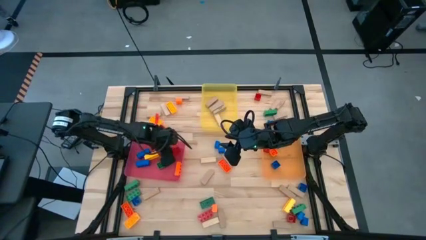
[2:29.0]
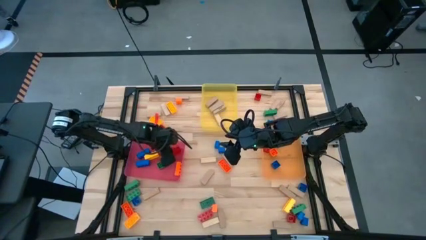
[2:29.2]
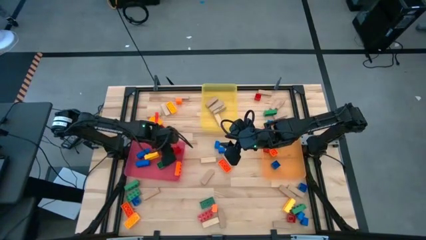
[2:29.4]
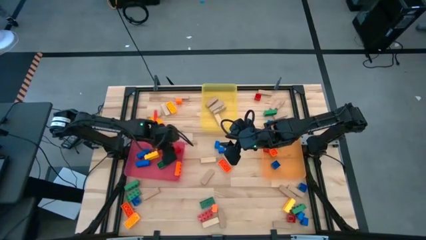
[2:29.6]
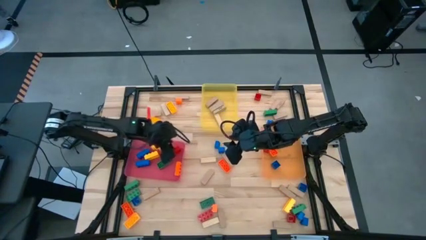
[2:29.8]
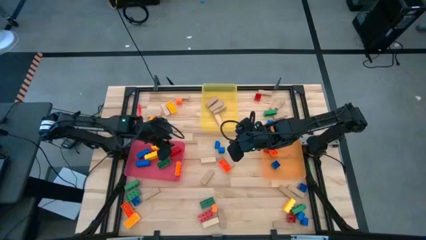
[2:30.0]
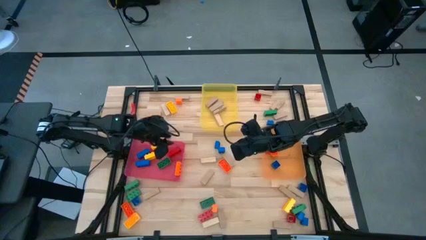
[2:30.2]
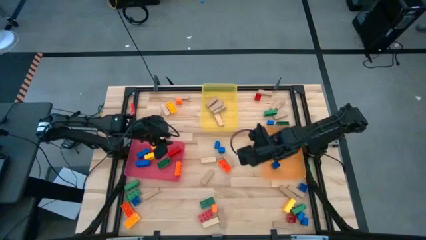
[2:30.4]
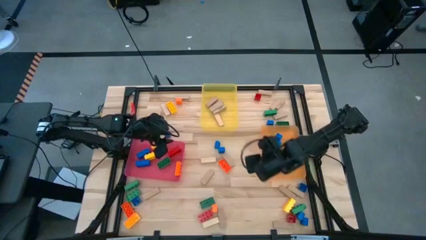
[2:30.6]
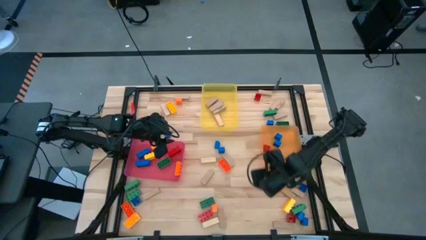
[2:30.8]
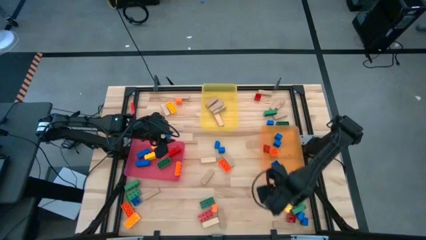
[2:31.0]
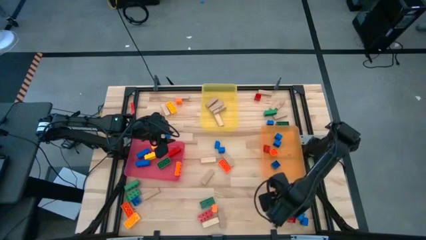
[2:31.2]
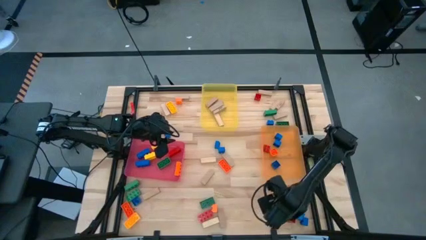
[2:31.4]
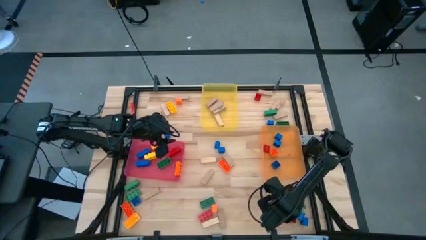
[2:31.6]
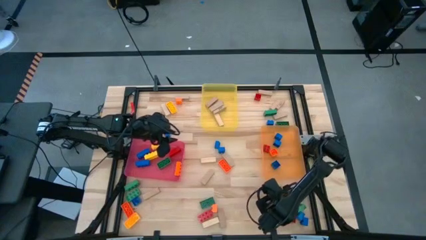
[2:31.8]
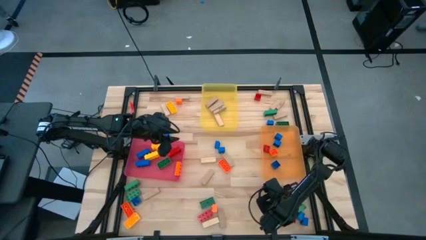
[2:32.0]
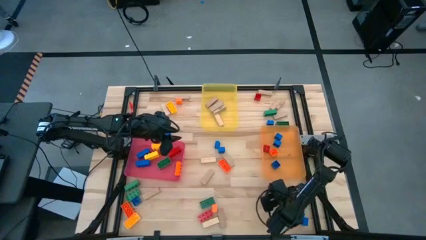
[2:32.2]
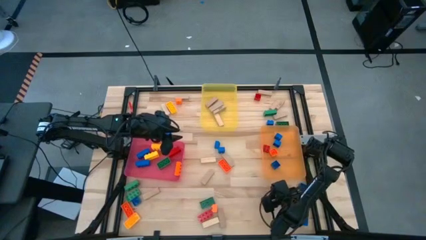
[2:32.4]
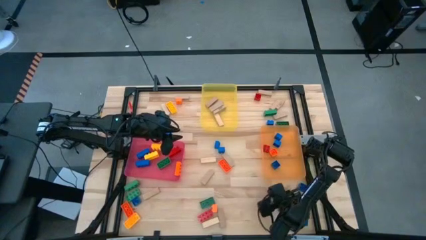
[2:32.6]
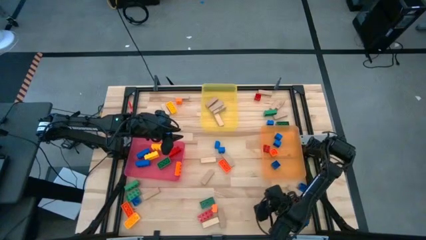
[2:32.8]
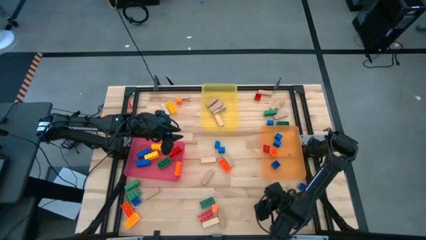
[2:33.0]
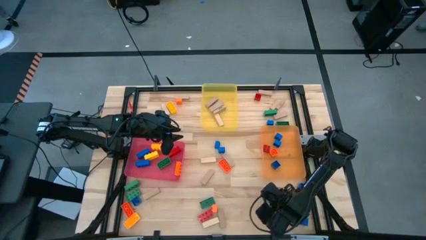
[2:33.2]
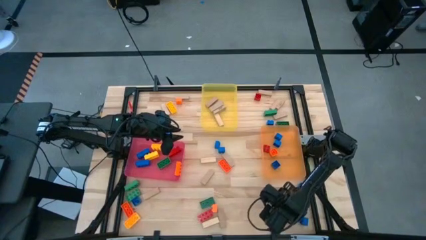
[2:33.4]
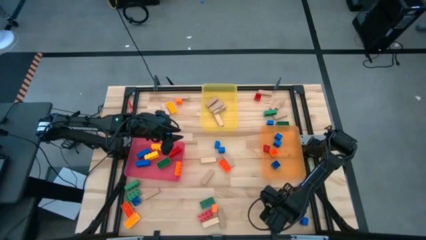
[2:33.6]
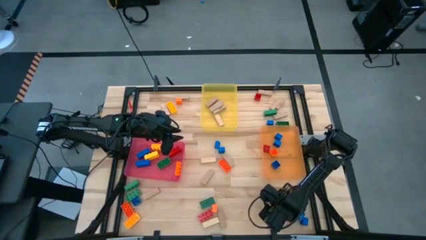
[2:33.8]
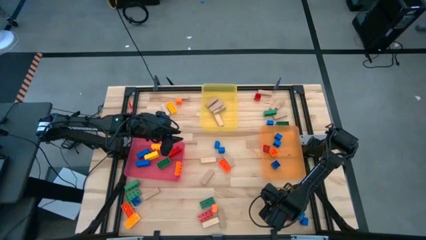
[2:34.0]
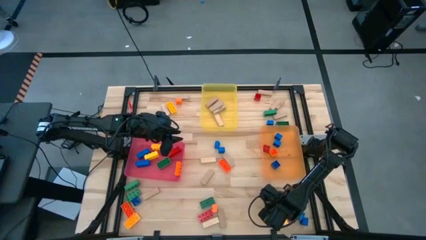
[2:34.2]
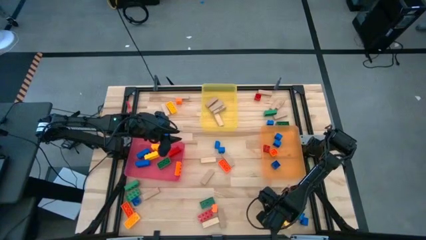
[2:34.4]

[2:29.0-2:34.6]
Task: Sort blocks by size
Put the wooden block into the yellow bin

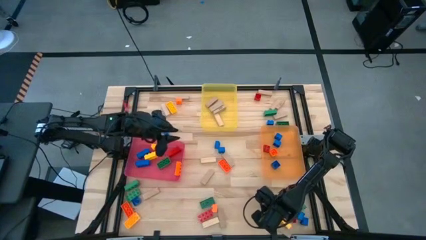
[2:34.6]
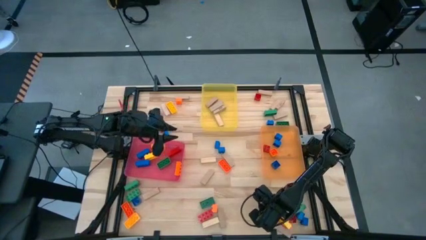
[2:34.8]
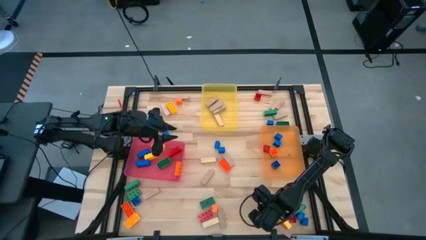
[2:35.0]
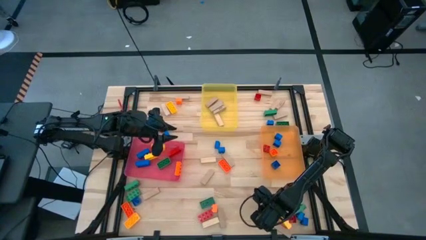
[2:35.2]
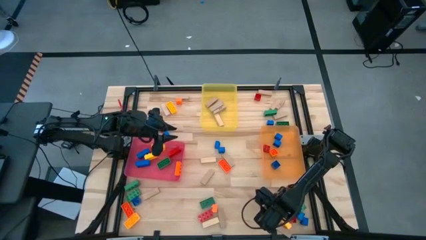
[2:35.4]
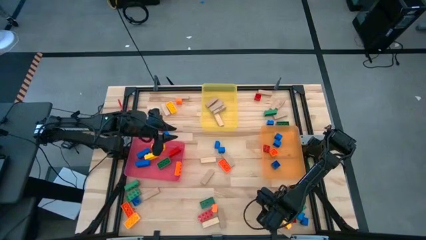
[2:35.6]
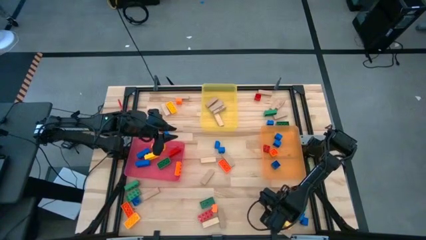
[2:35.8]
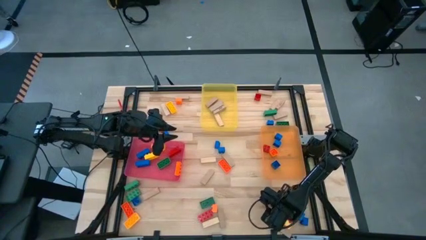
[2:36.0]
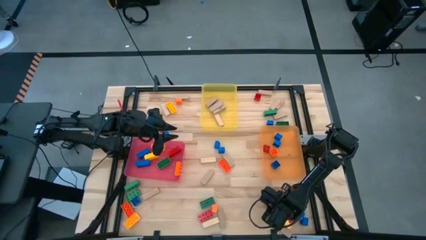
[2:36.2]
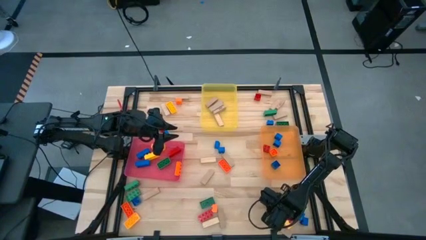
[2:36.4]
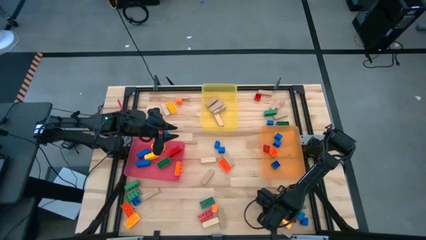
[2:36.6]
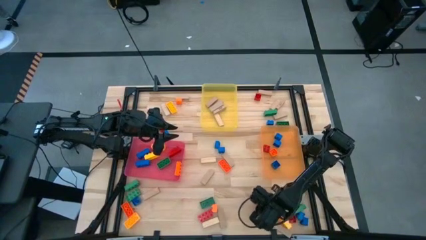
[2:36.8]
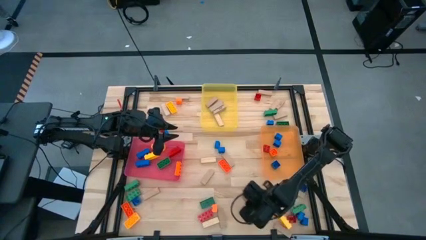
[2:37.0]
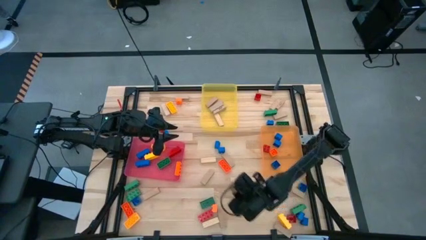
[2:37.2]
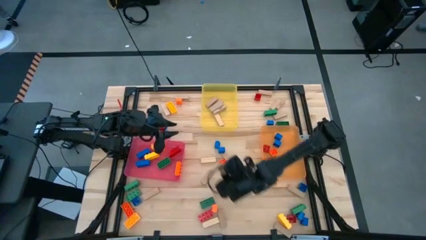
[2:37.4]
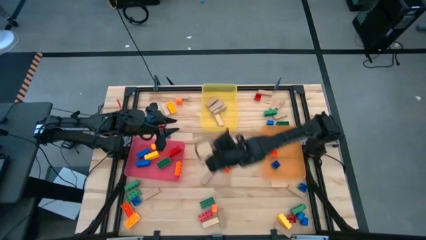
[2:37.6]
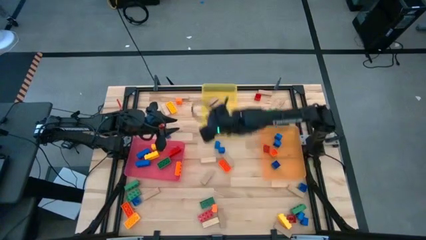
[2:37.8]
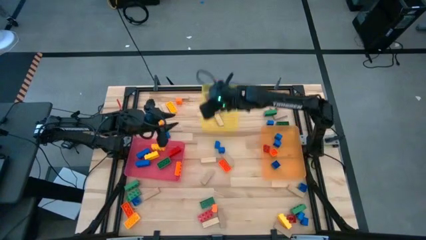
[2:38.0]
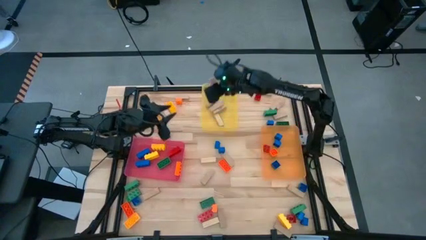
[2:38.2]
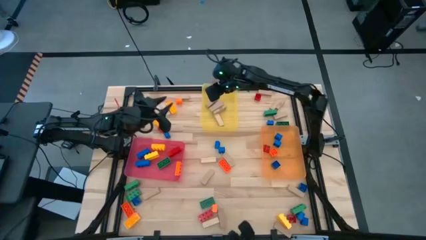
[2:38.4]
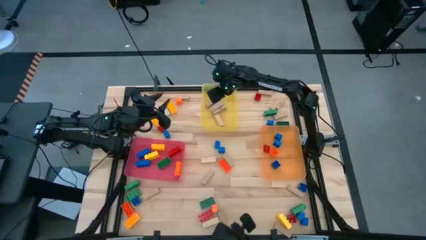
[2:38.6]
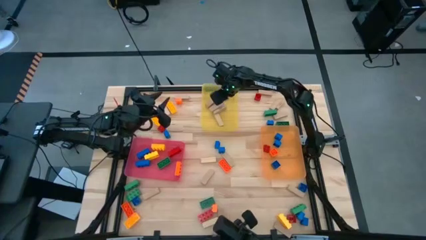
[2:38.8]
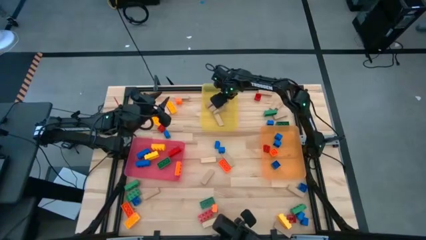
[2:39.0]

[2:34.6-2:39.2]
Put the wooden block into the yellow bin

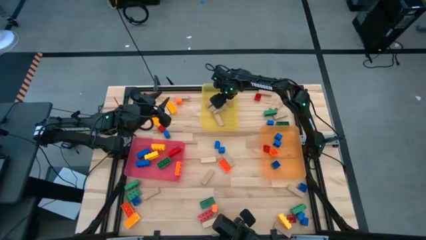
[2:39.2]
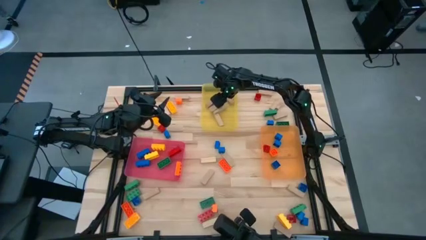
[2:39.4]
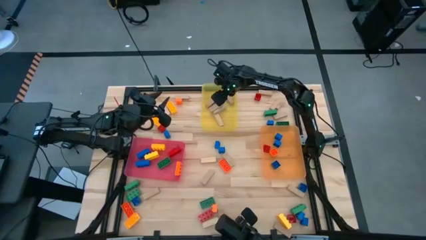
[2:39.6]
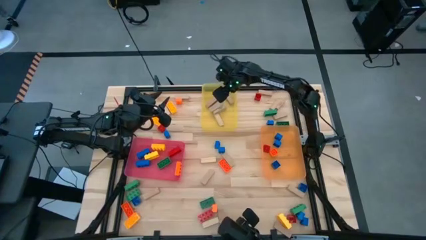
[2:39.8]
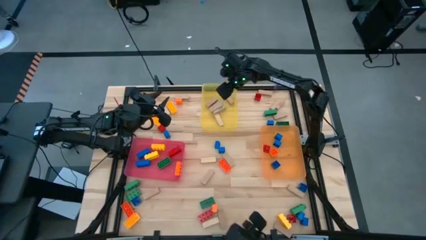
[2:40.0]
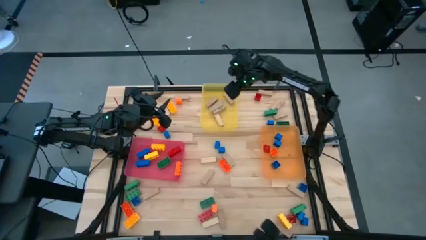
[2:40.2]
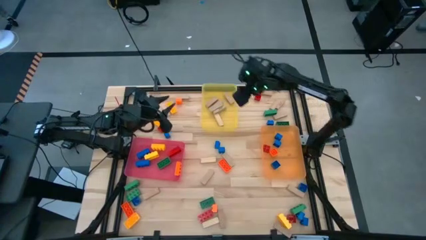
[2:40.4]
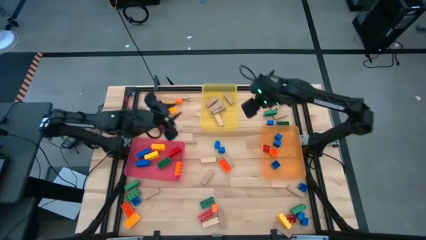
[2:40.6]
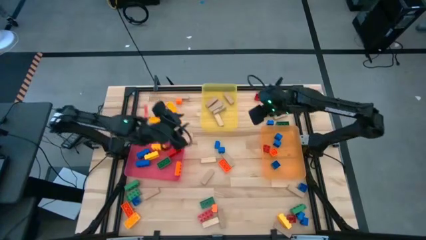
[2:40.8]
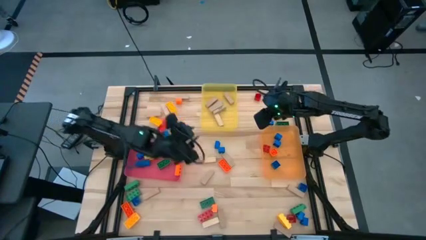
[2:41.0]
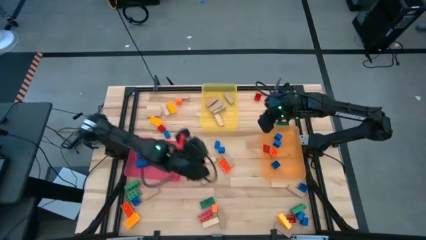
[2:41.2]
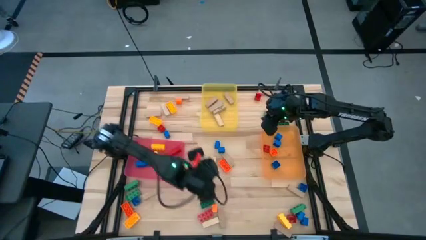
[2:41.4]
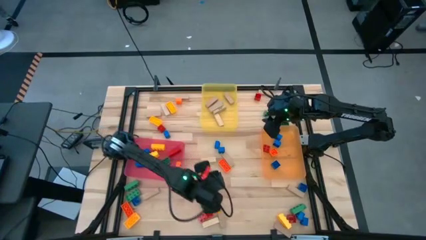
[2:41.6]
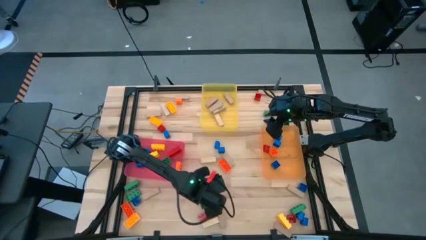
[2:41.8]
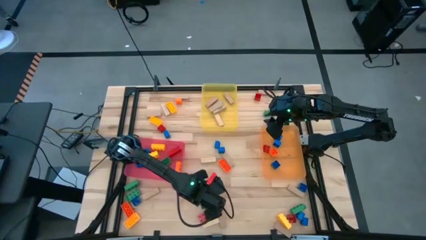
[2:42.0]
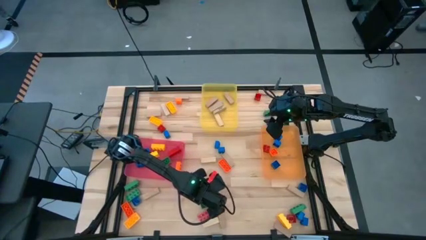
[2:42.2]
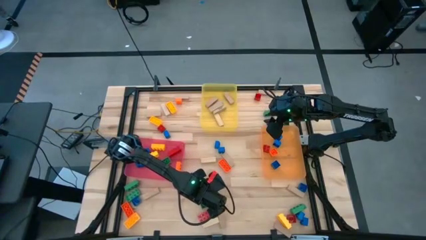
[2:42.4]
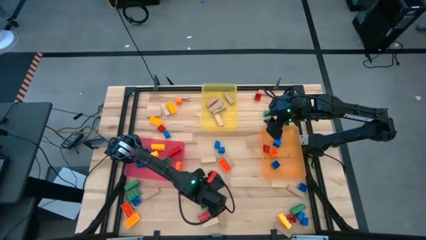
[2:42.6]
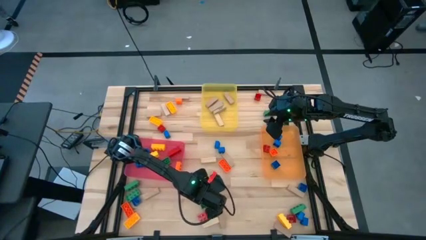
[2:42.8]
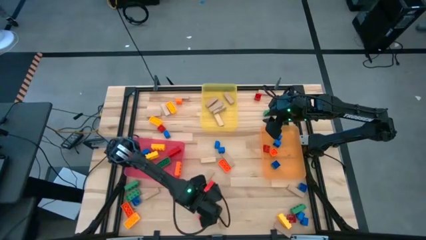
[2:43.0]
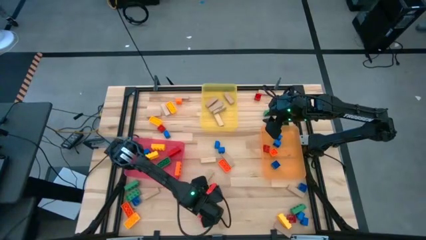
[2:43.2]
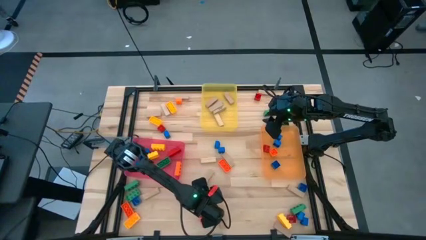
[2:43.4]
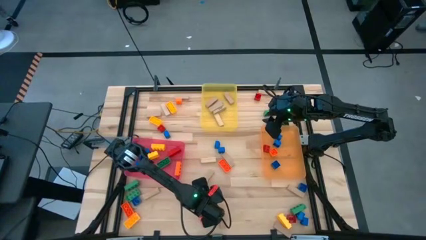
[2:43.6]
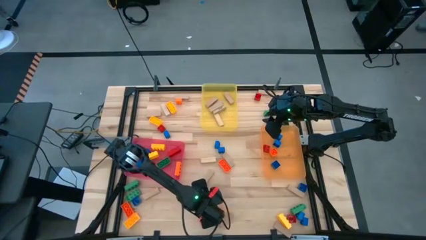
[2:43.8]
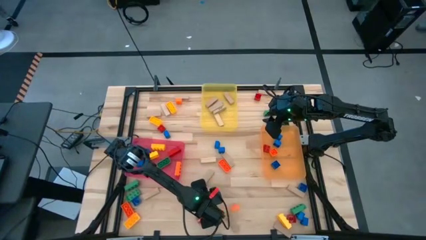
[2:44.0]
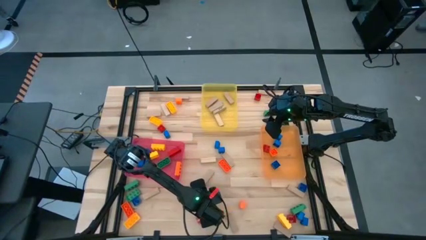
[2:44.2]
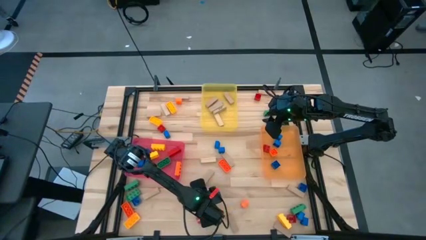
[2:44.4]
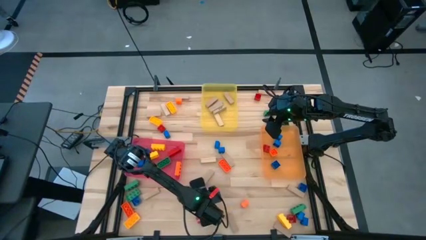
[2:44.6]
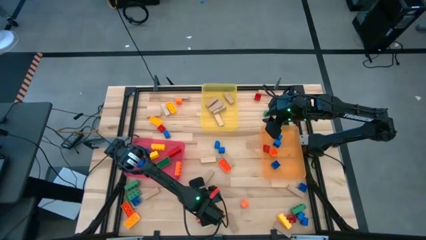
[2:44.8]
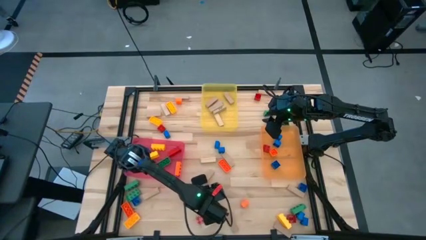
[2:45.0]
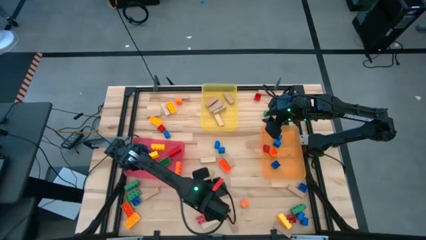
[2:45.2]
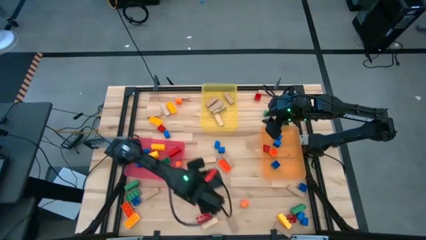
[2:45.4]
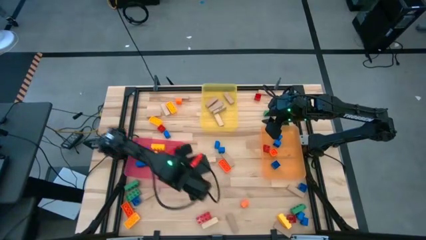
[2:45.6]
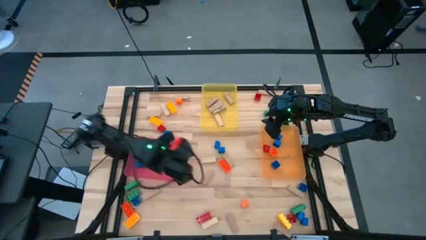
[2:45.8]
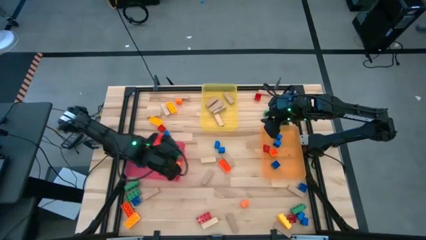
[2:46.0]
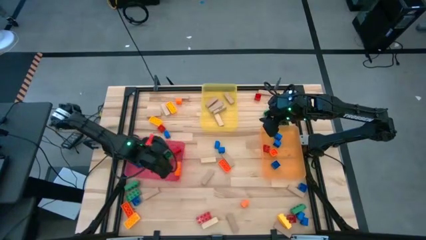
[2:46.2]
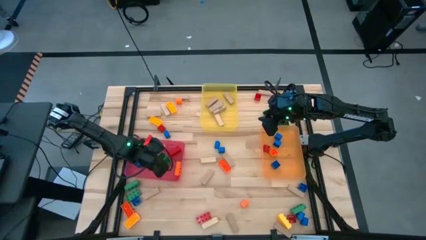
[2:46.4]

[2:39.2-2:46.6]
Put the 3 stud green game piece into the pink bin
